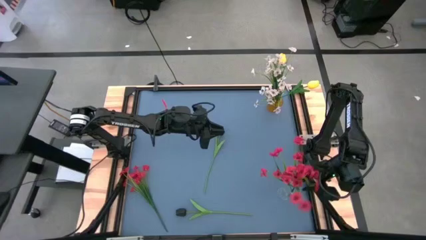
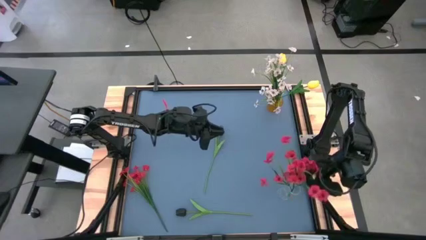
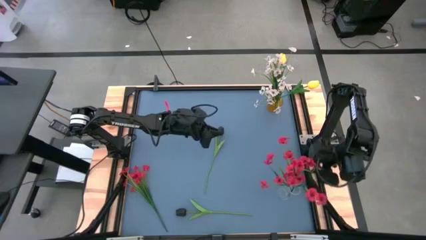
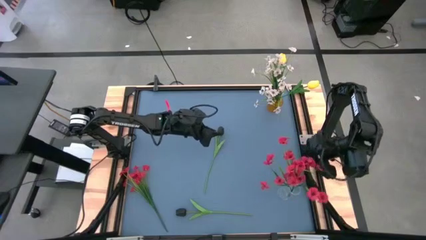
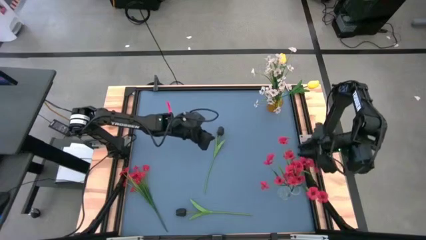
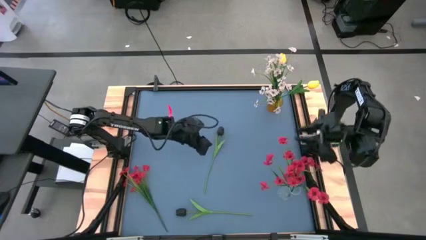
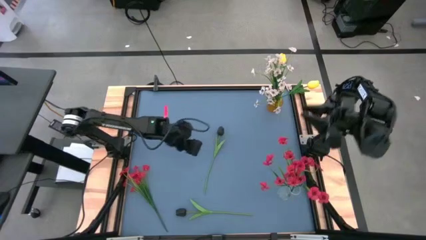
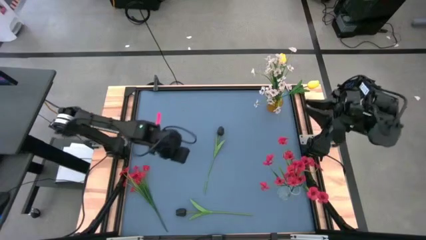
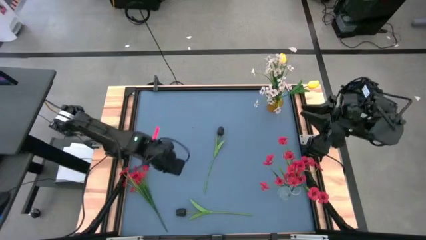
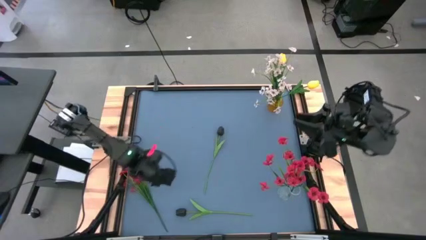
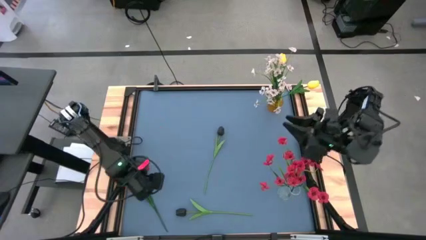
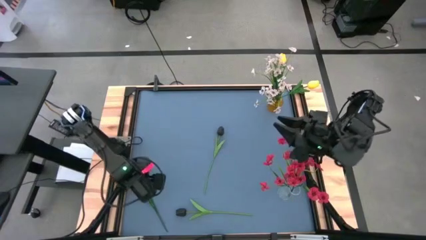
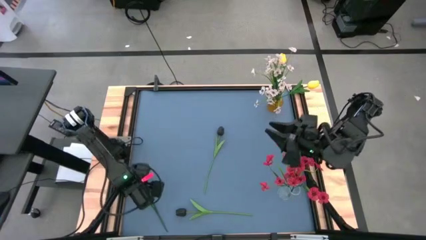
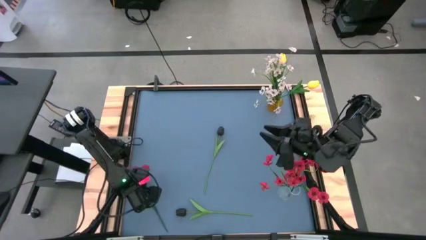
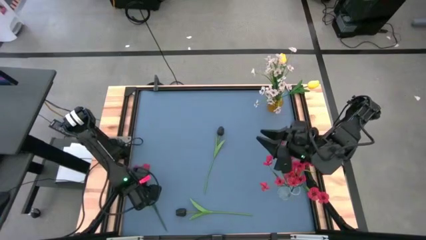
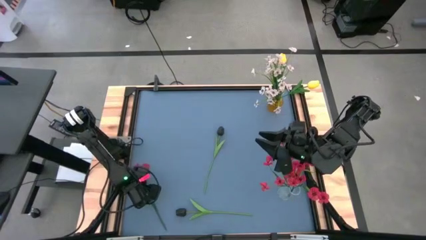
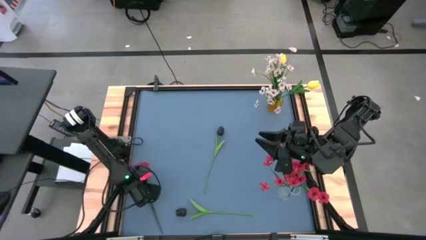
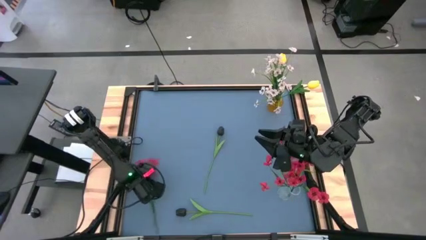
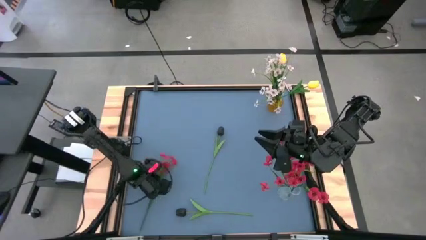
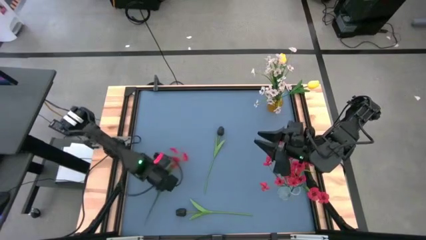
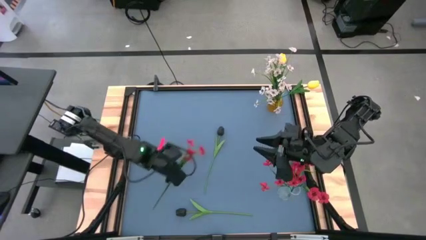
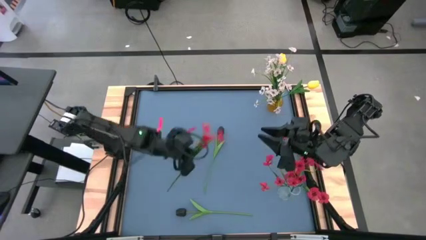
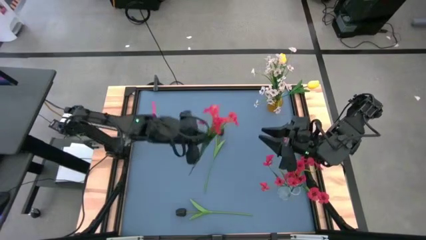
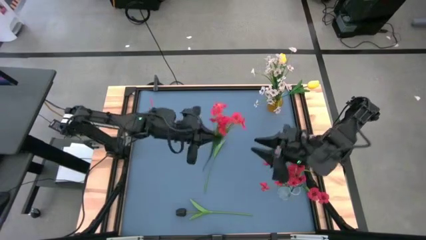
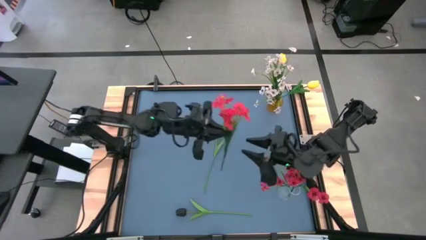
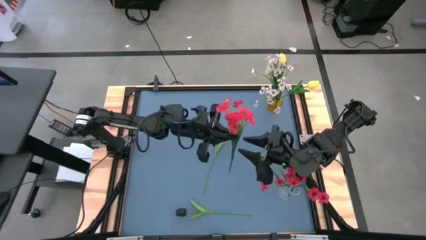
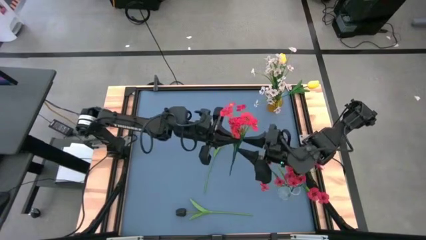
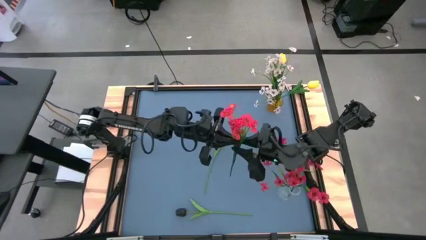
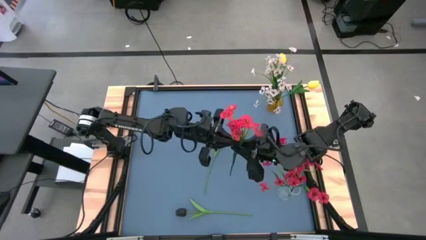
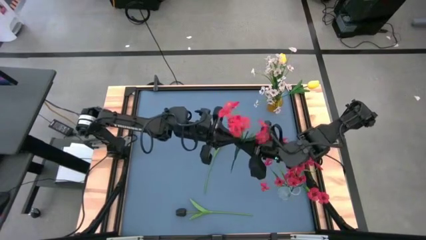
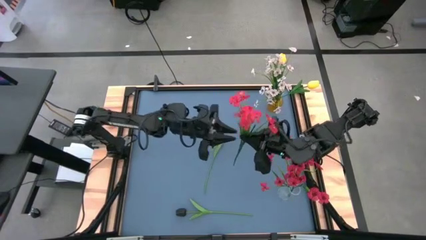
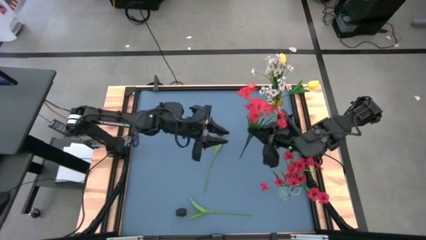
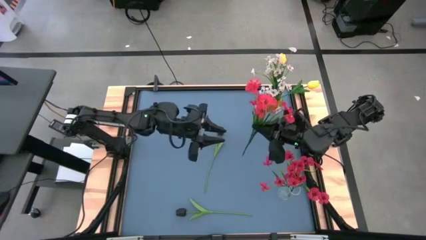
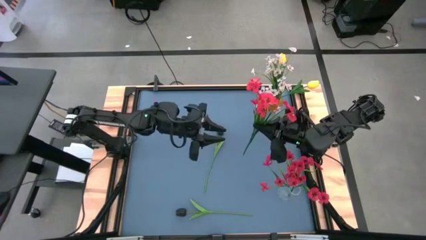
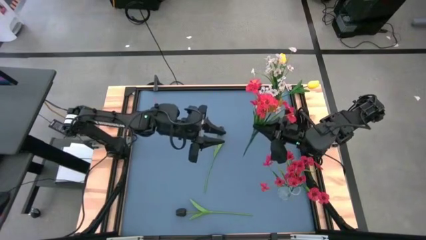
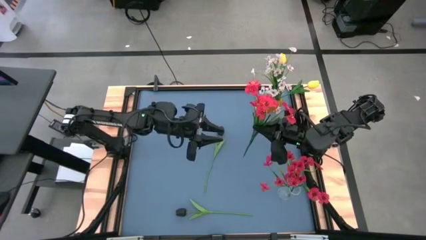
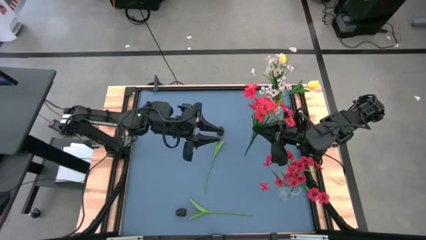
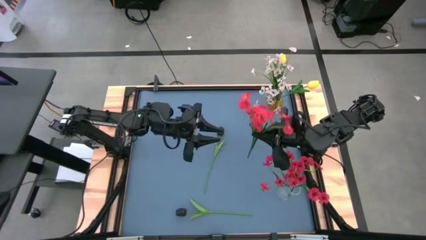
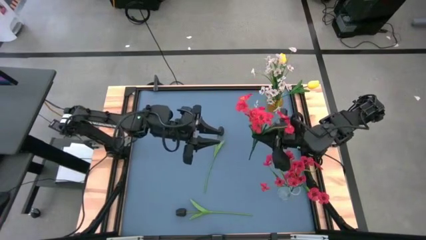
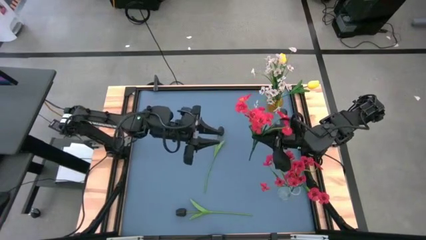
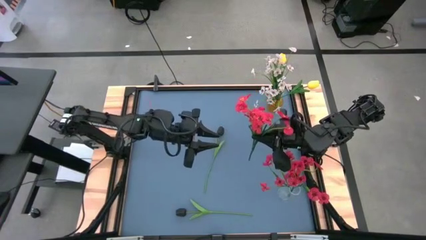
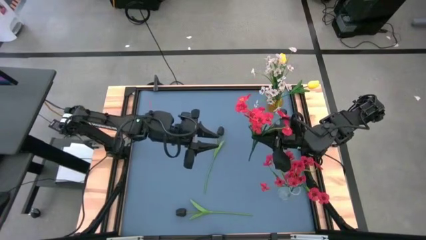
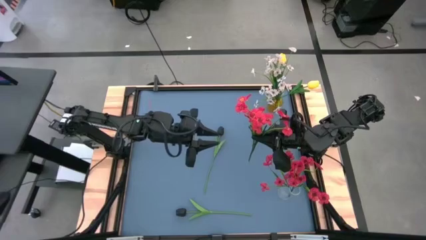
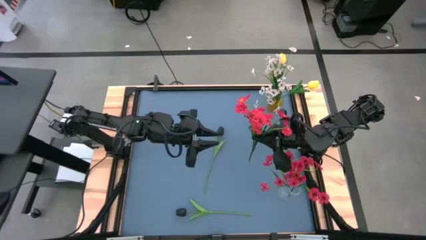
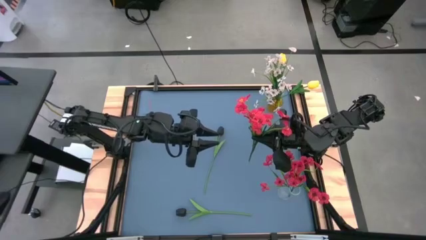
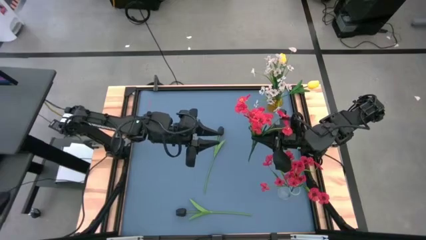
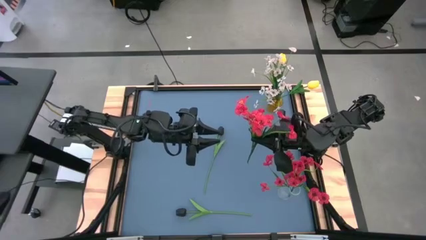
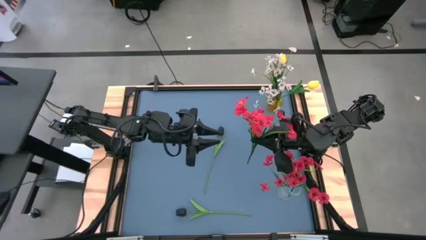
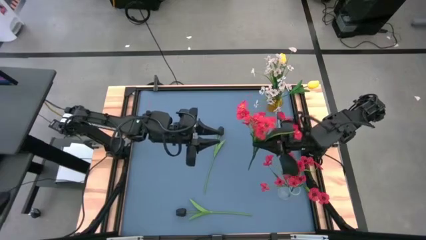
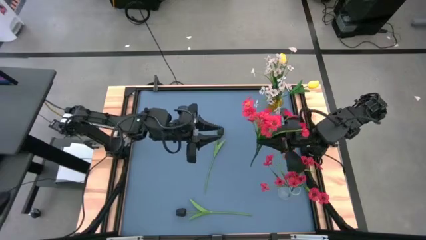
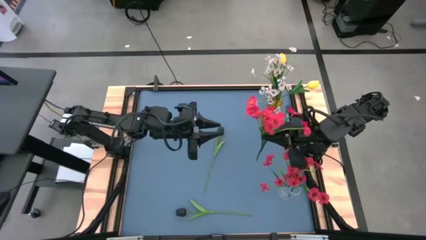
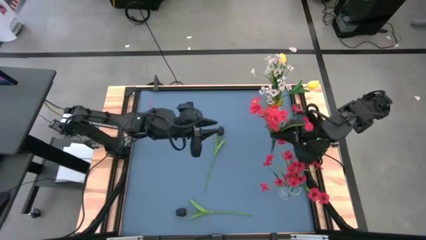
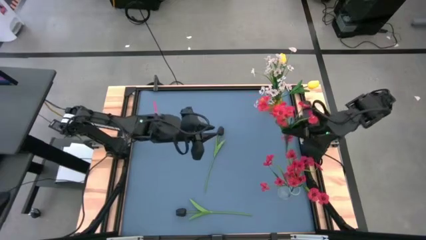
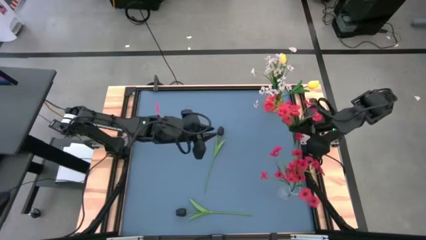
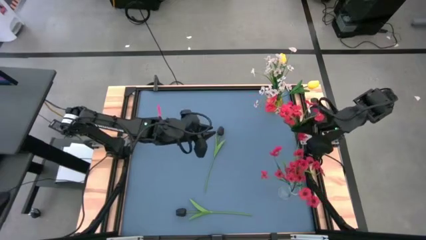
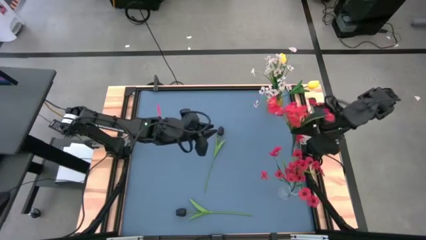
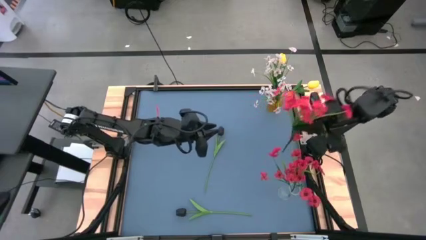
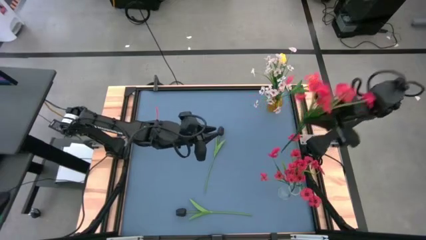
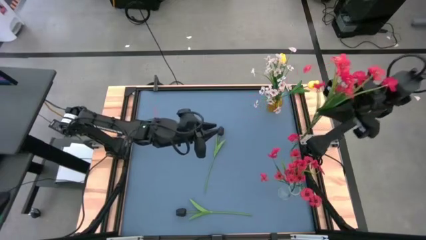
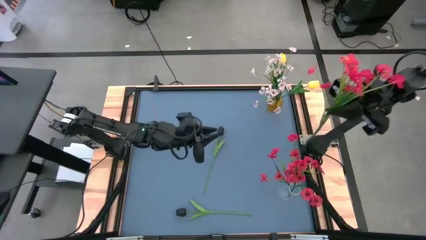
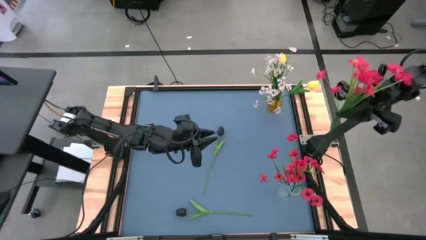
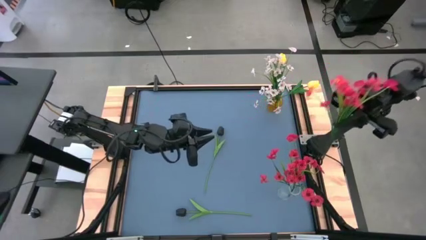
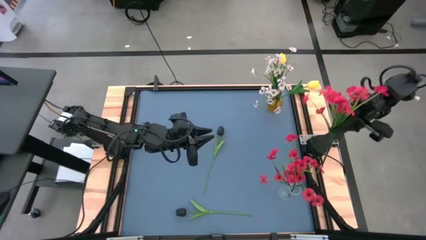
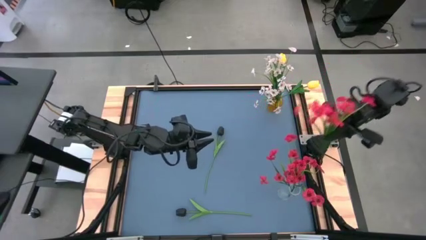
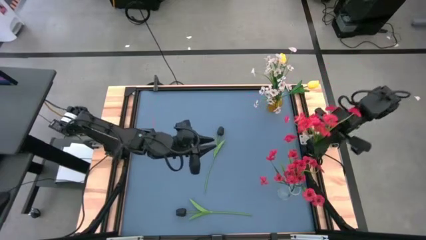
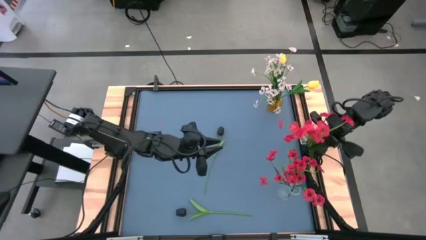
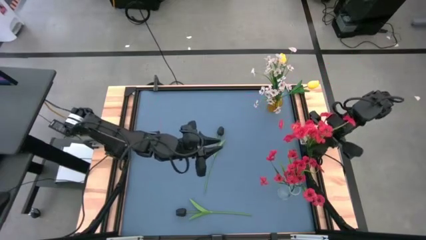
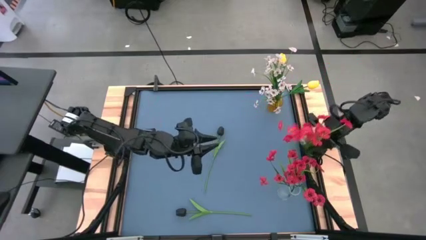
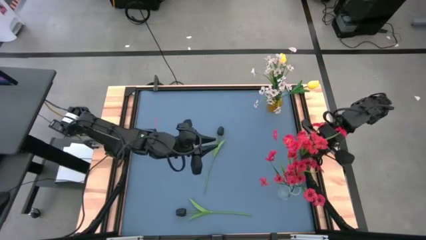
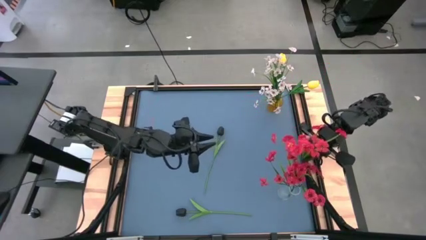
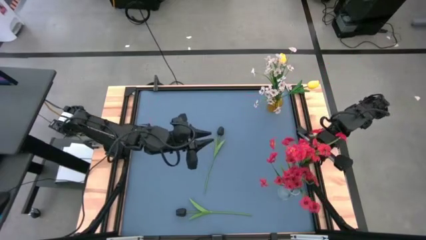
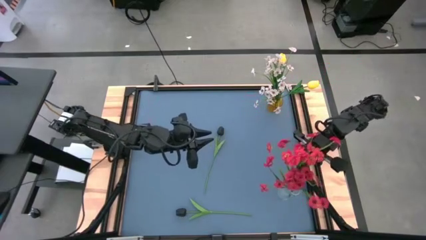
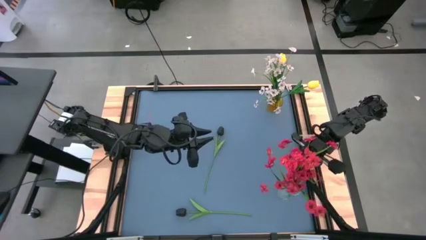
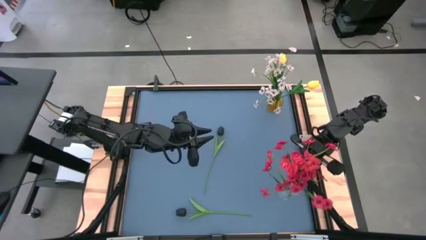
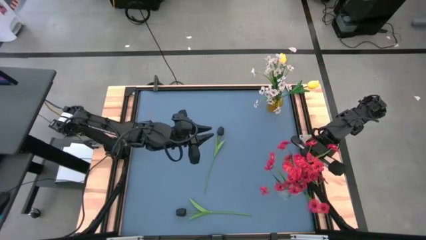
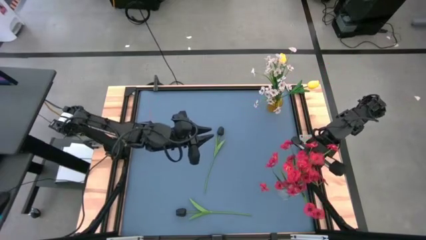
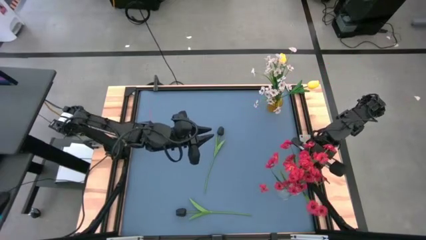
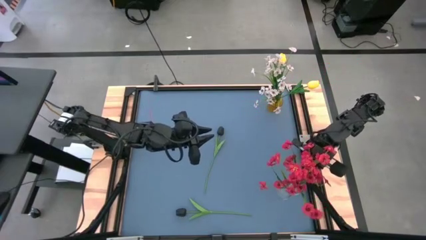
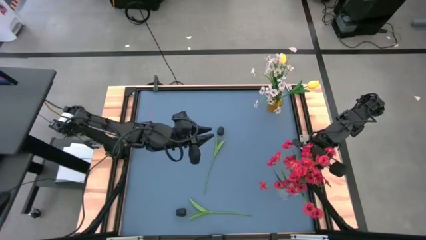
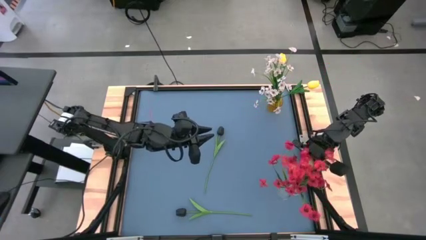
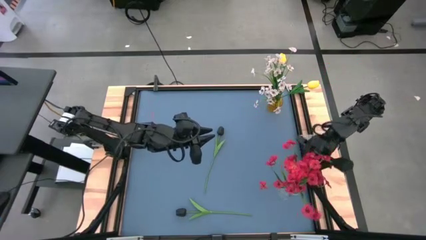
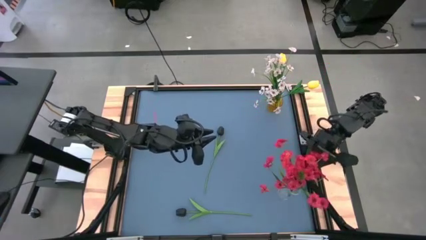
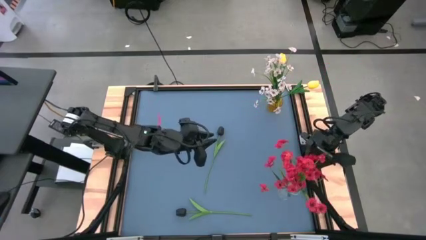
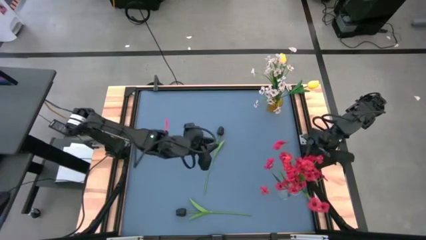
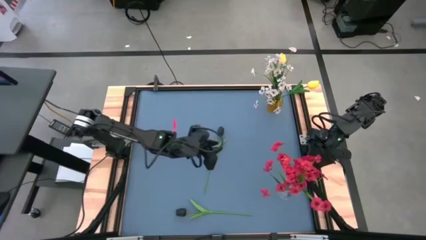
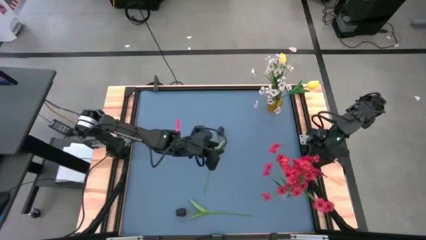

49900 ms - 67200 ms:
Task: Sort flowers into vase by color
Put the red flowers into the transparent vase
